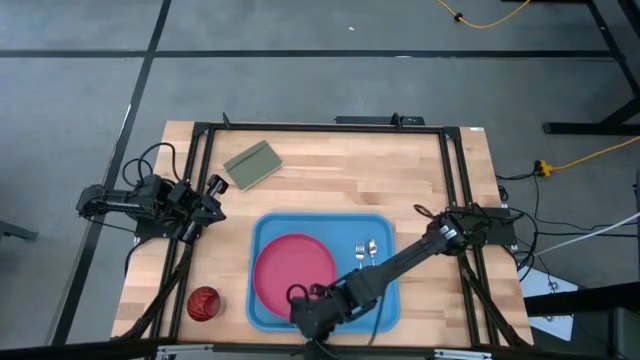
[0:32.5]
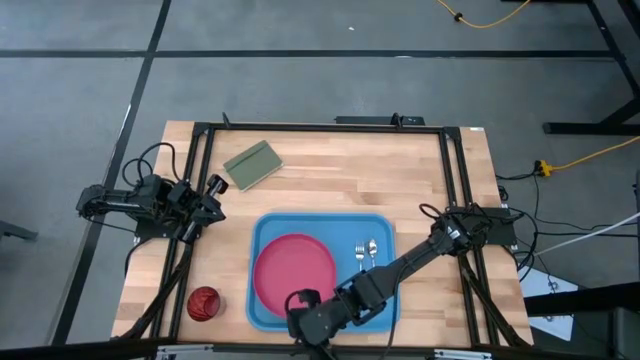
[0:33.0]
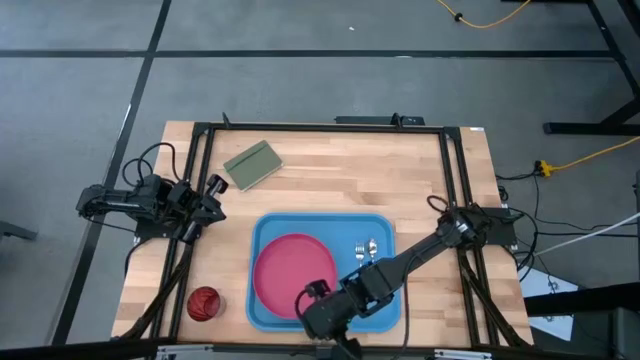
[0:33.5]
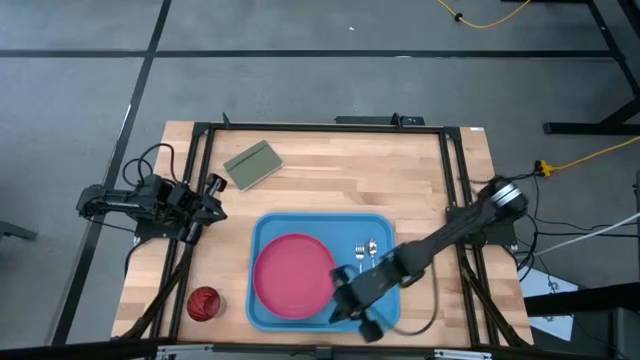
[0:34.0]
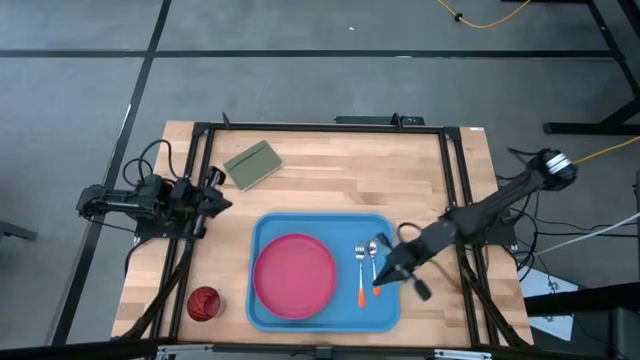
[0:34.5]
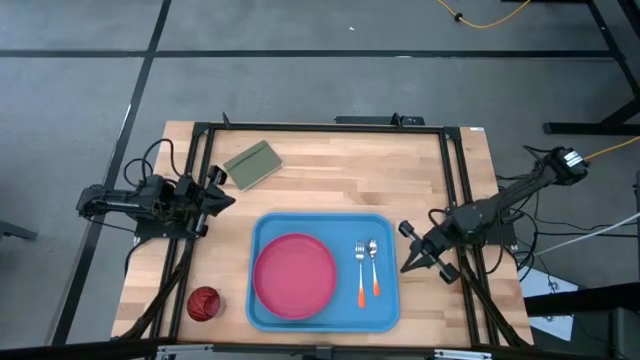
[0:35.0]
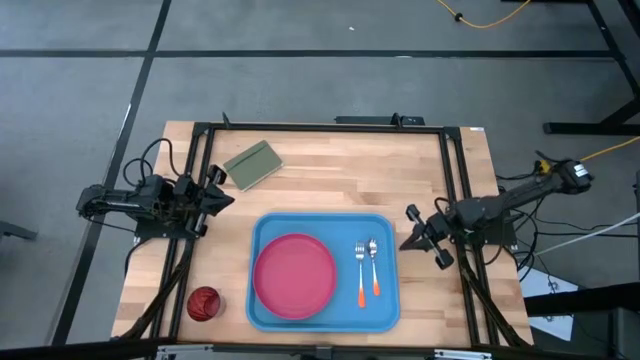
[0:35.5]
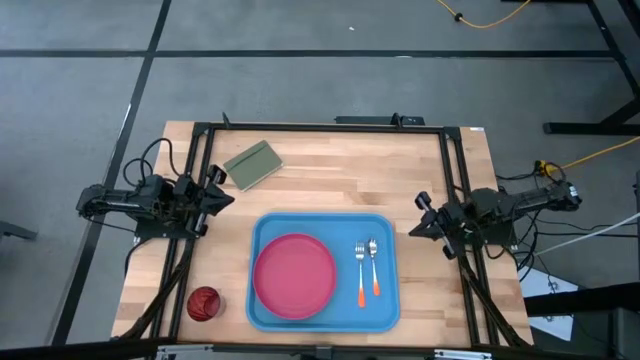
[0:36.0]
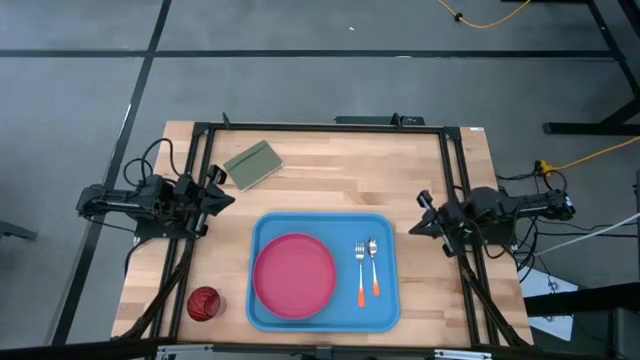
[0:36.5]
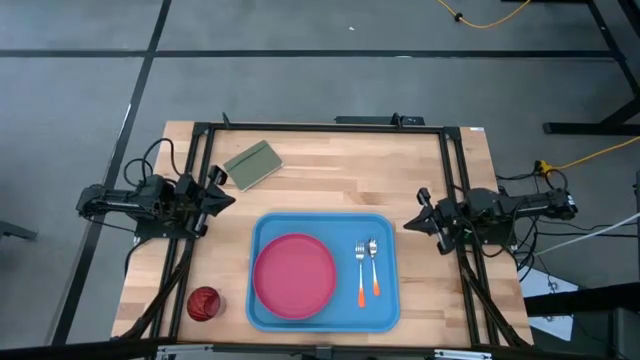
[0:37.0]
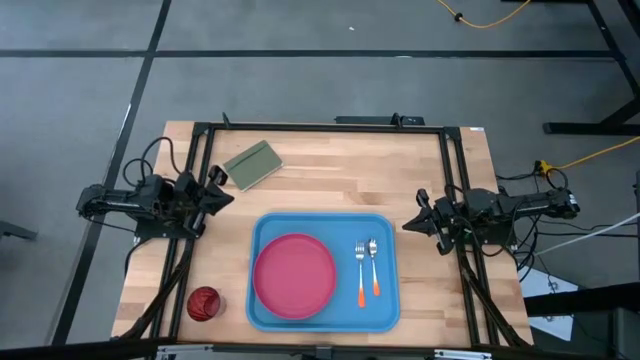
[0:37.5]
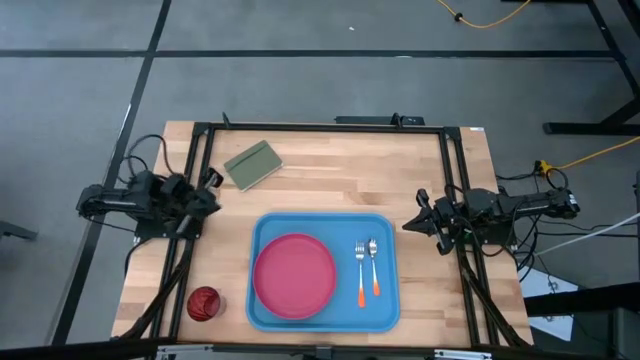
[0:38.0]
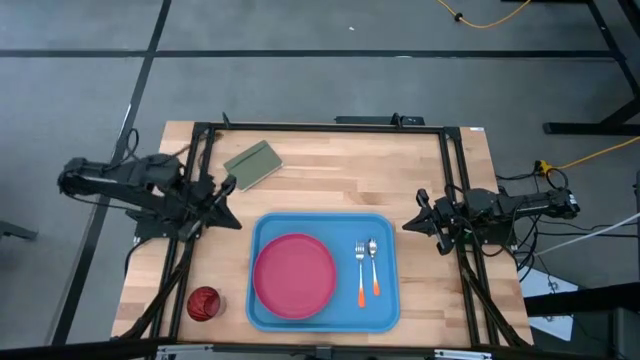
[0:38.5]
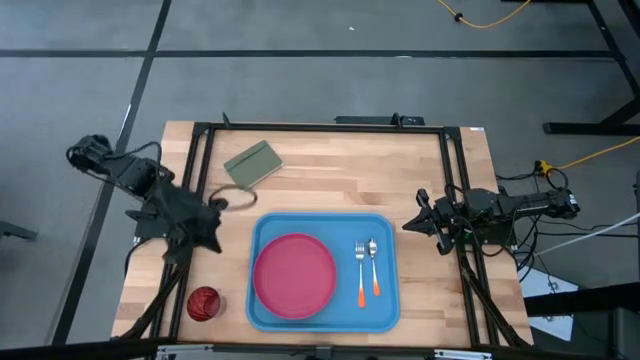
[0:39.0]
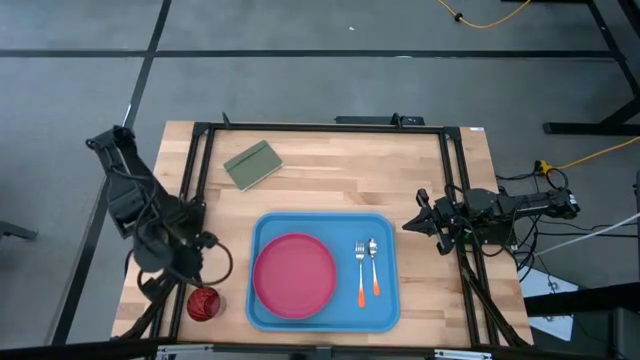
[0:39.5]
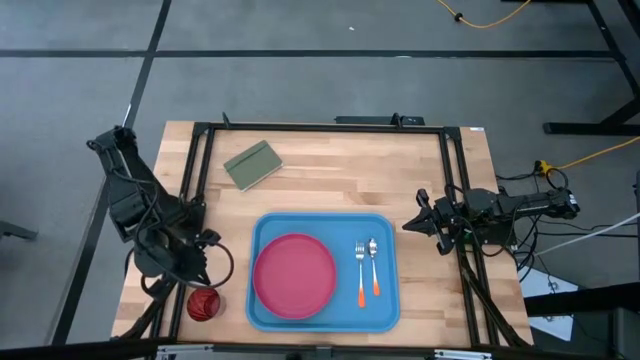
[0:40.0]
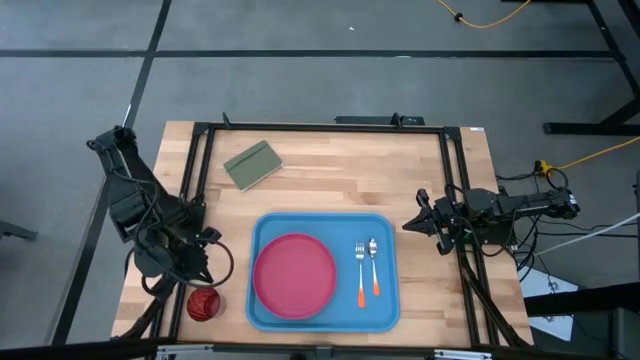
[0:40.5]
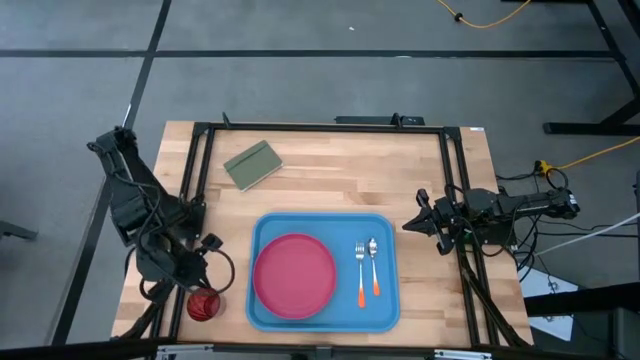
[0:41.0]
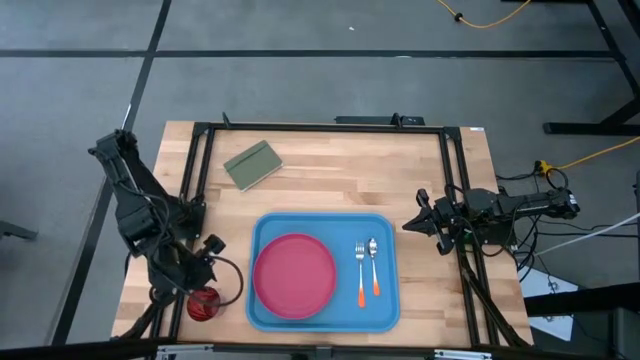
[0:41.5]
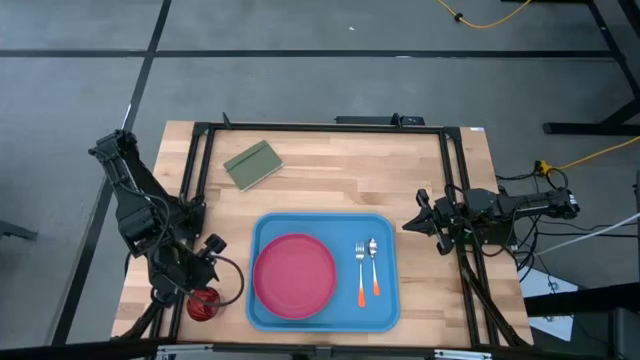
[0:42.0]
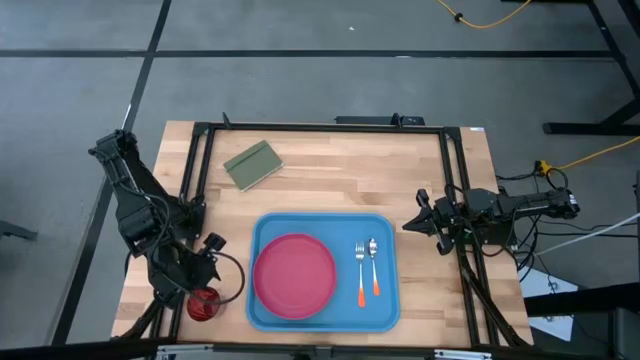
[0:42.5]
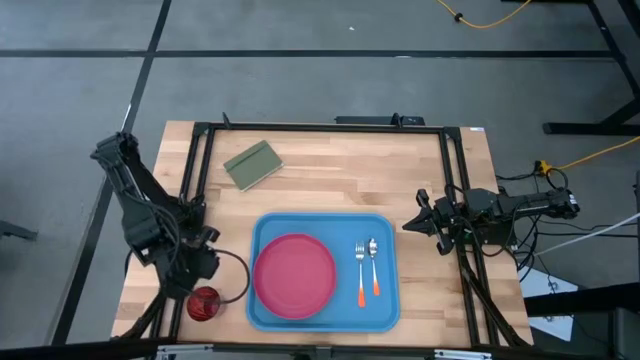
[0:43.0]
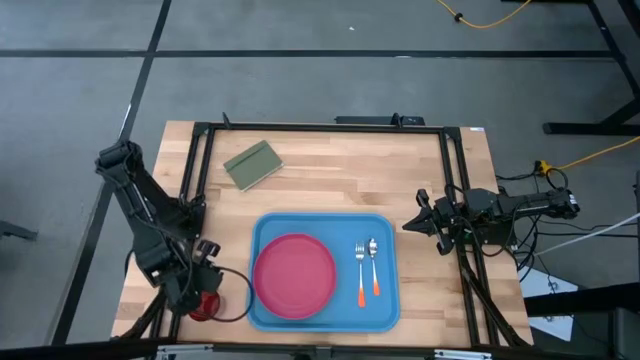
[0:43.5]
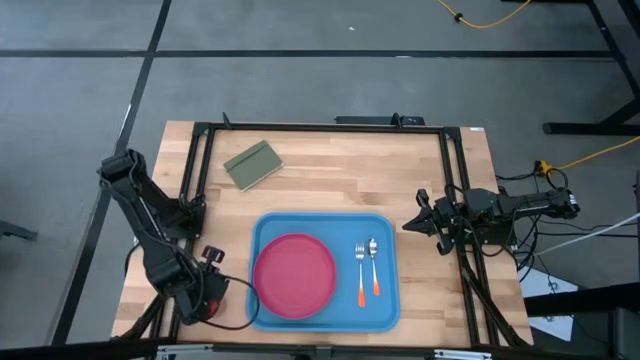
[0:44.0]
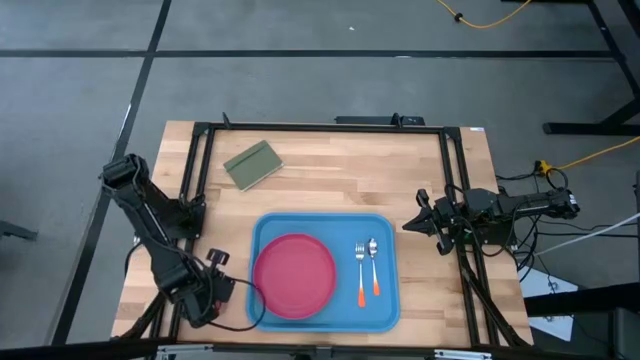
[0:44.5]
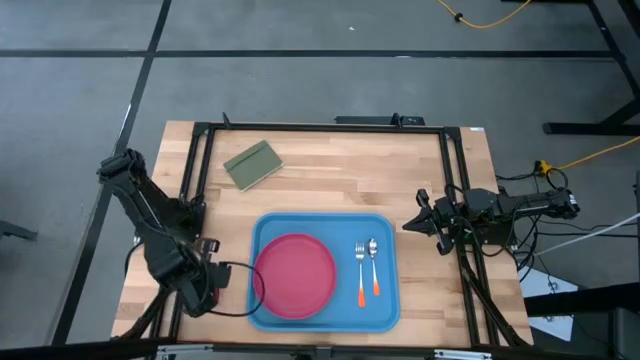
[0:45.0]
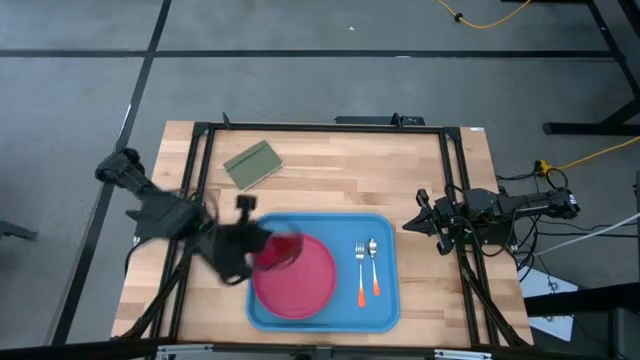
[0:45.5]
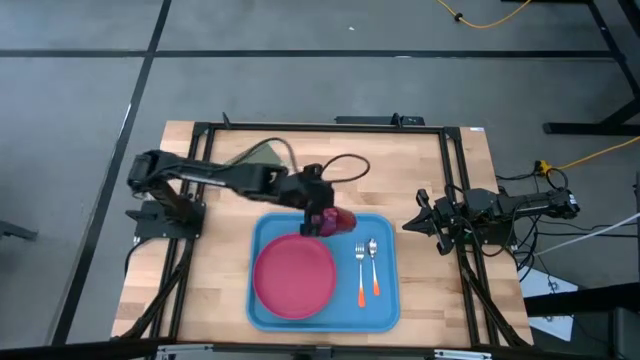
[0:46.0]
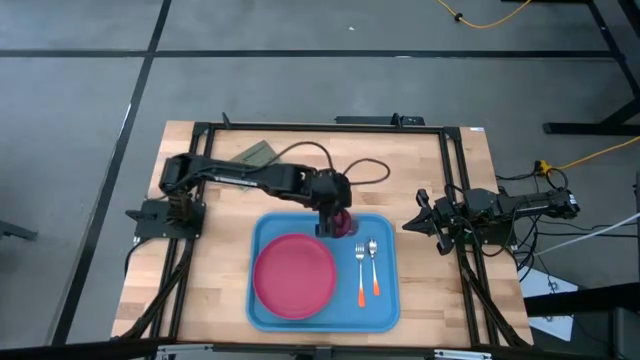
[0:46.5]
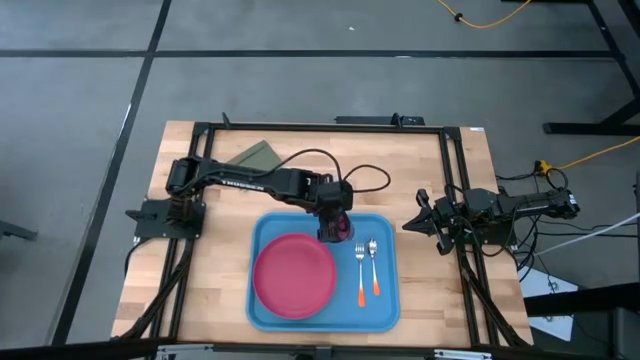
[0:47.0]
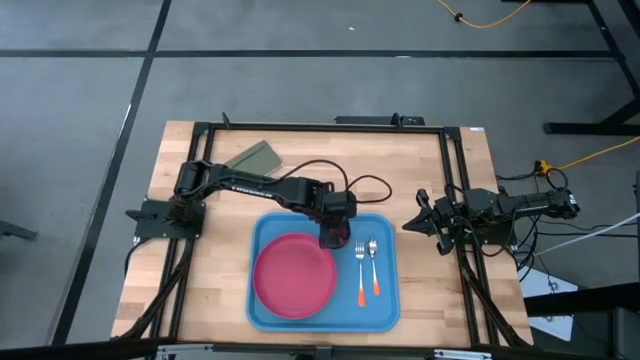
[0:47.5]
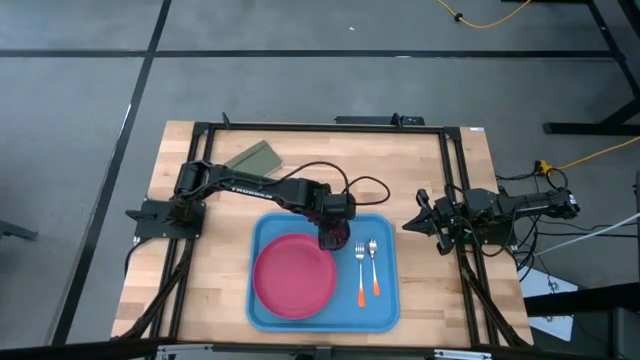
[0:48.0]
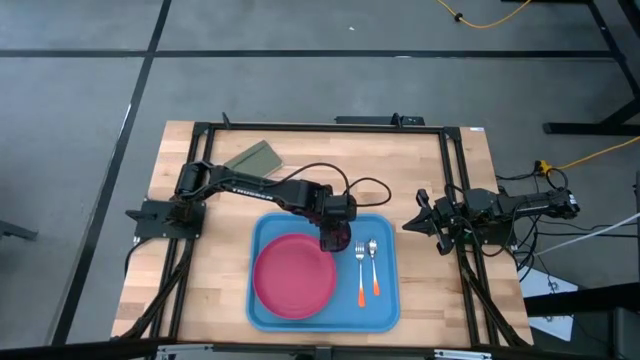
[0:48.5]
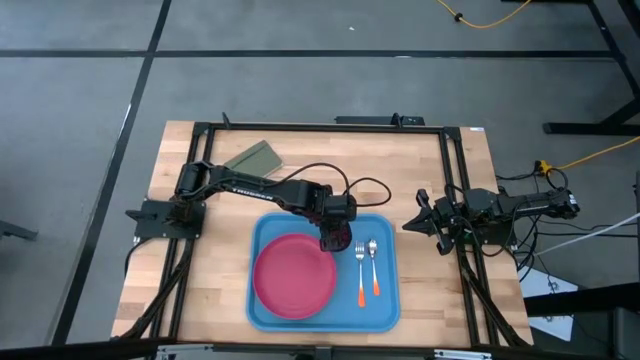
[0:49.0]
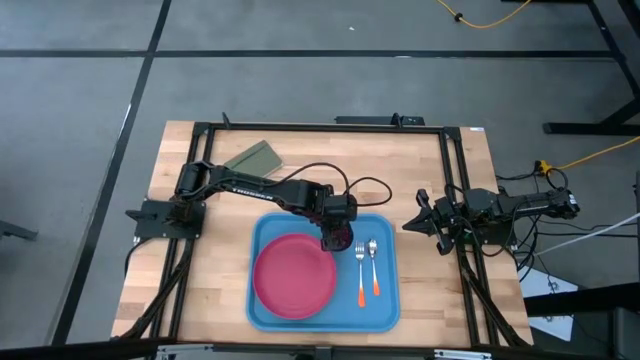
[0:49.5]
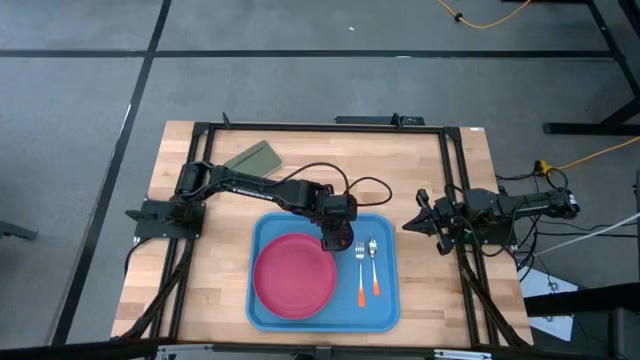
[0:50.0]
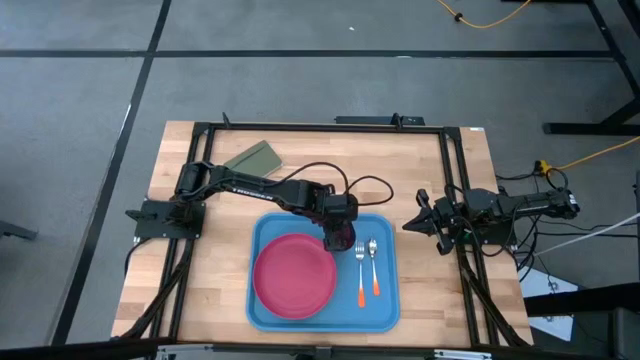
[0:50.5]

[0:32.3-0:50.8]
Task: Pick and place plate/cup/fork/spoon on tray
Put the red cup on the top middle of the blue tray

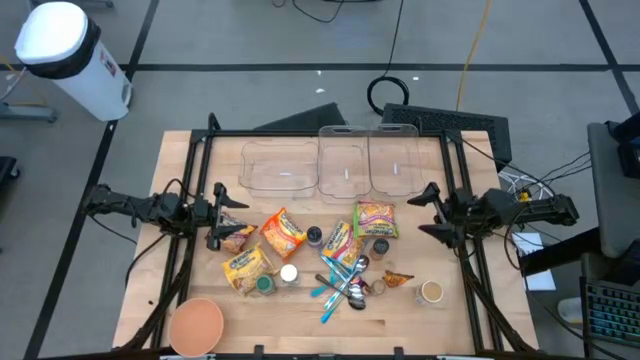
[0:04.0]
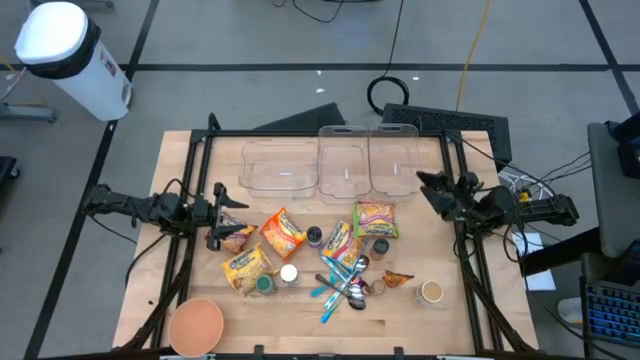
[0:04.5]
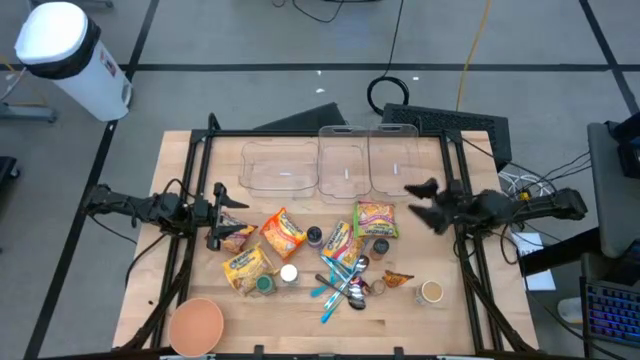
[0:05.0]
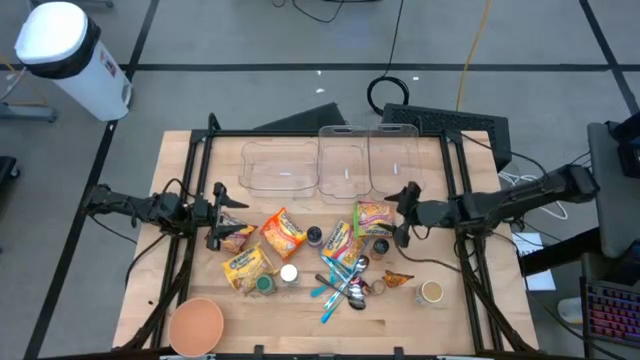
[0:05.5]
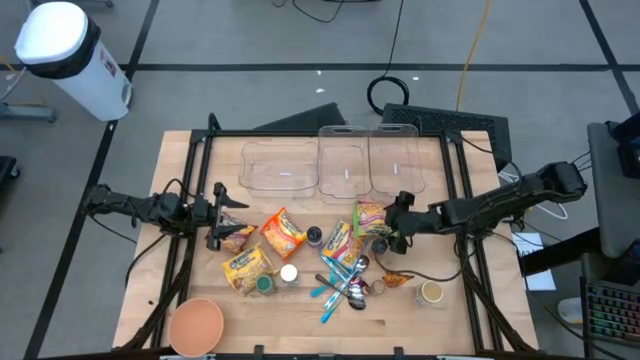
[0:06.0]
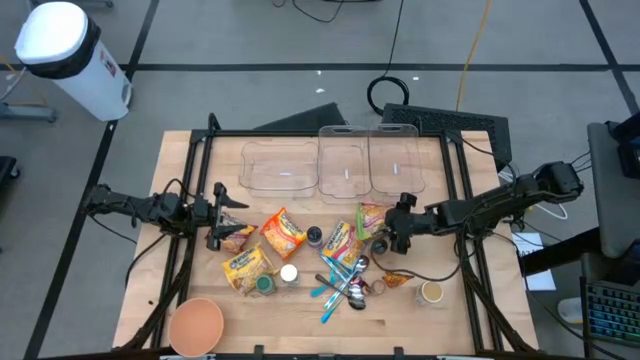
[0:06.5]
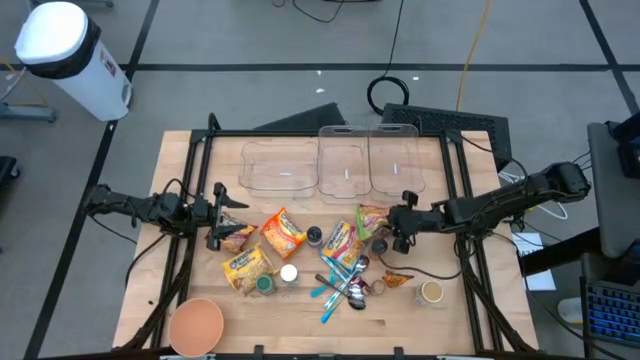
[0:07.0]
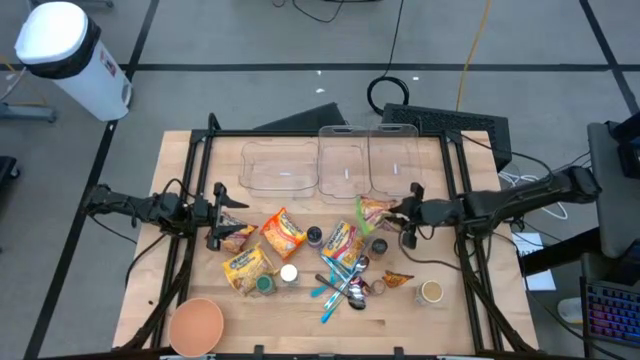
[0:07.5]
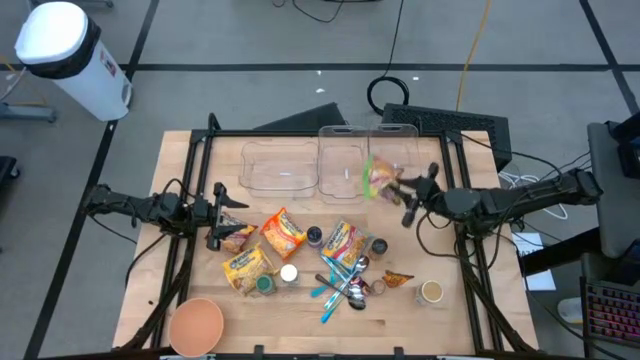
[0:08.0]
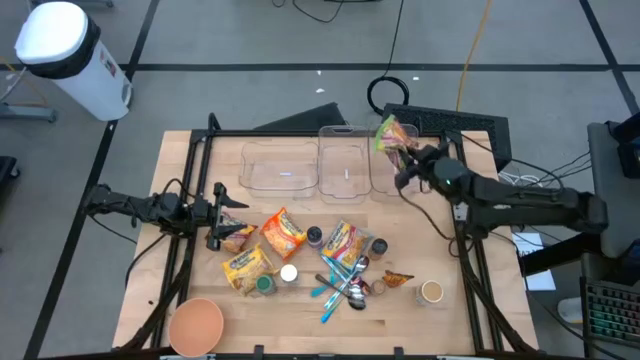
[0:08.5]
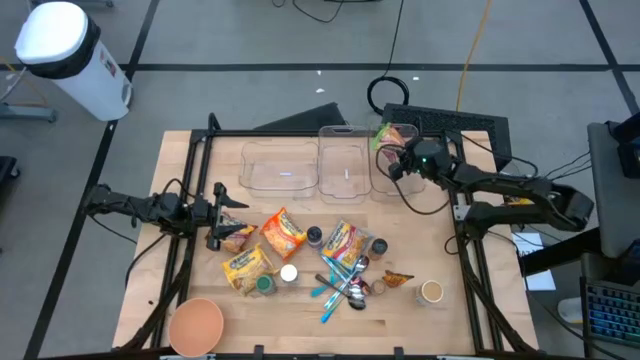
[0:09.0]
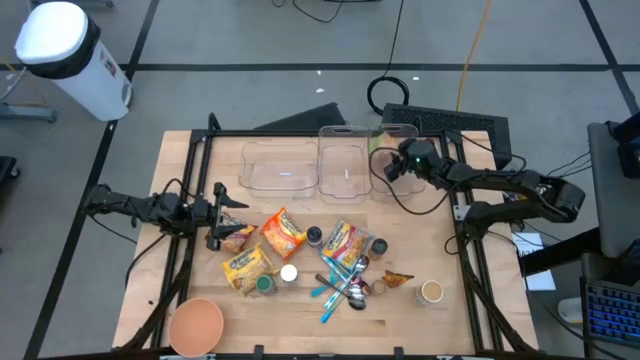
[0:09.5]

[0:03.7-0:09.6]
Task: Pick & Place Food Item
Put the green noodle pack into the right transparent bin
